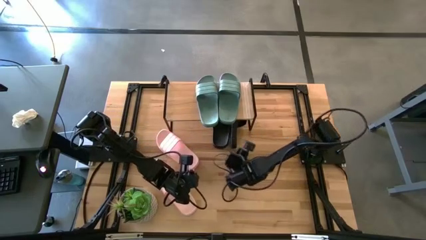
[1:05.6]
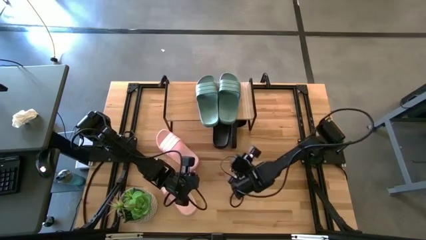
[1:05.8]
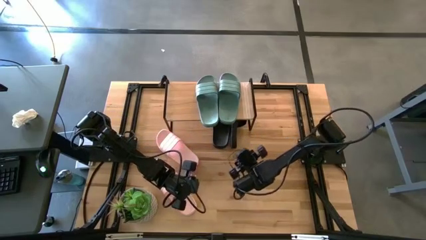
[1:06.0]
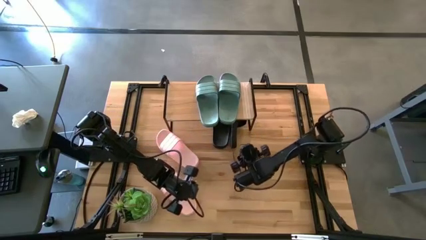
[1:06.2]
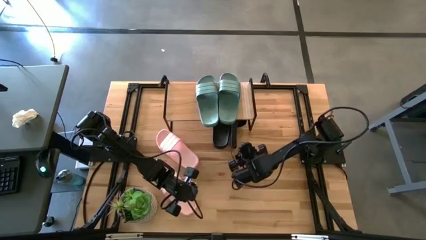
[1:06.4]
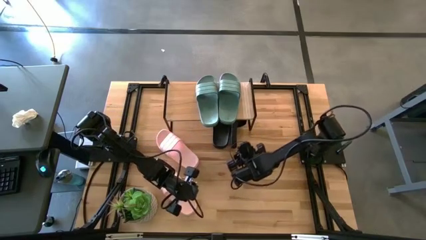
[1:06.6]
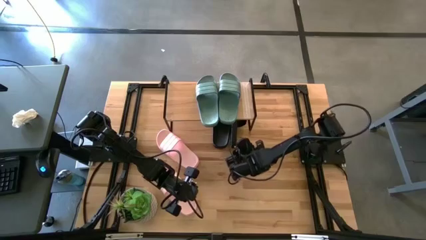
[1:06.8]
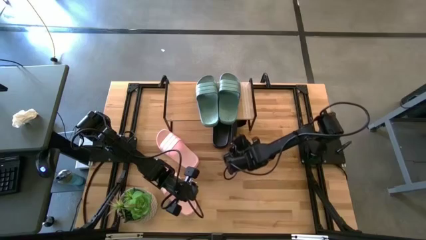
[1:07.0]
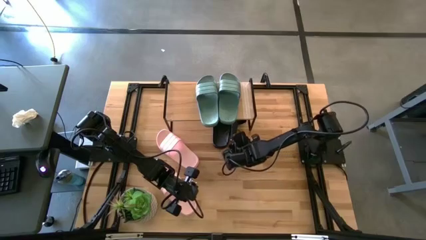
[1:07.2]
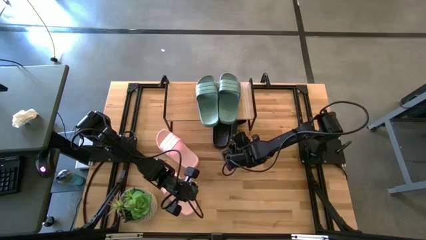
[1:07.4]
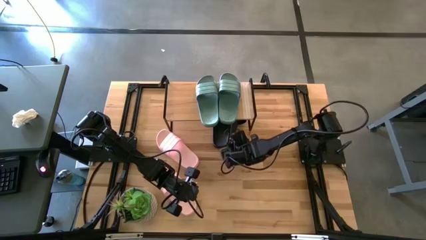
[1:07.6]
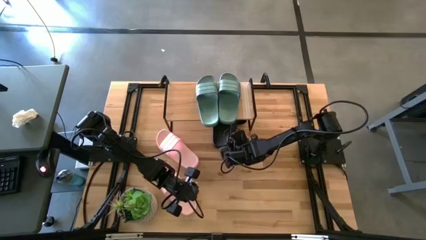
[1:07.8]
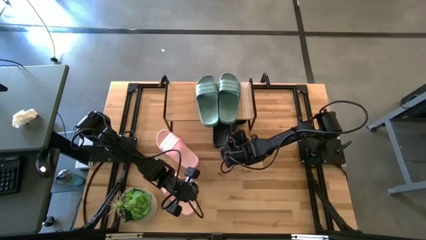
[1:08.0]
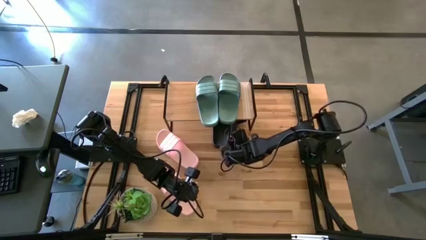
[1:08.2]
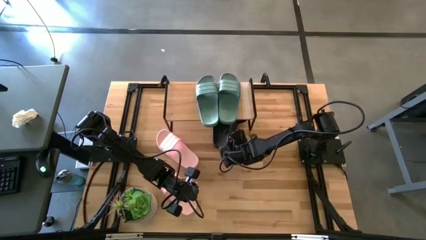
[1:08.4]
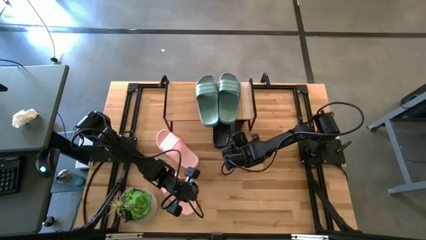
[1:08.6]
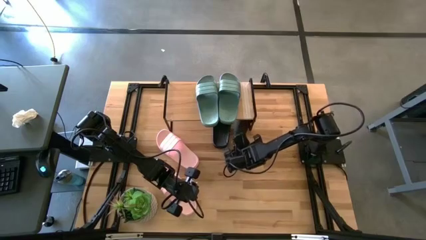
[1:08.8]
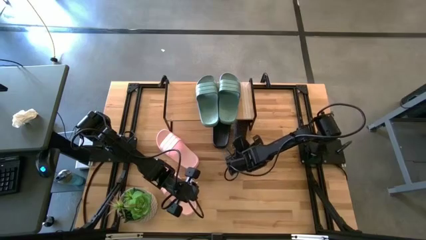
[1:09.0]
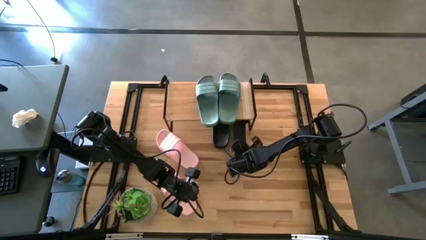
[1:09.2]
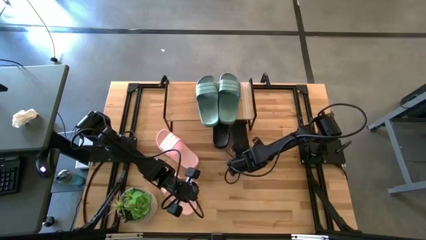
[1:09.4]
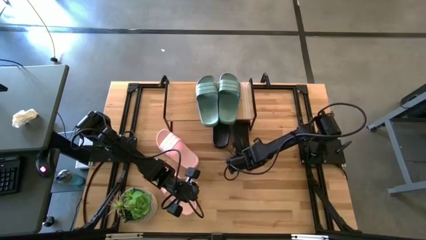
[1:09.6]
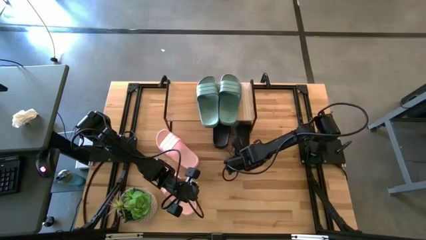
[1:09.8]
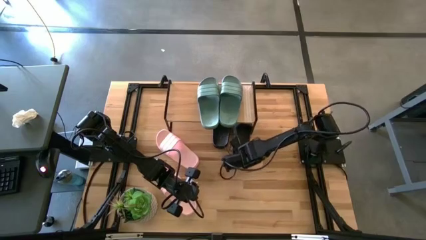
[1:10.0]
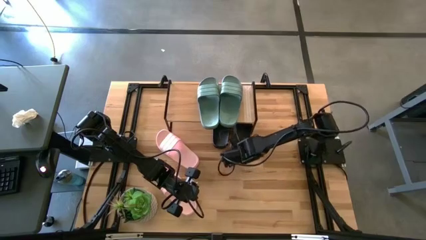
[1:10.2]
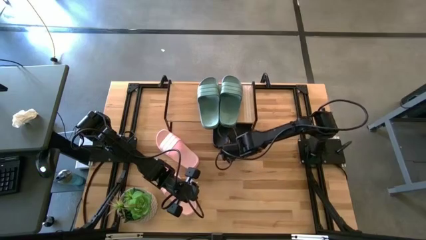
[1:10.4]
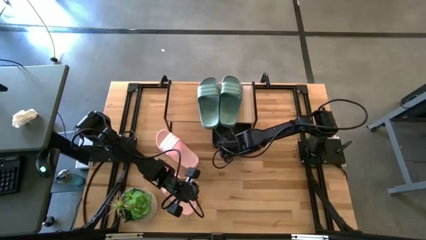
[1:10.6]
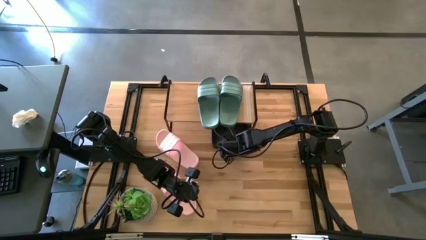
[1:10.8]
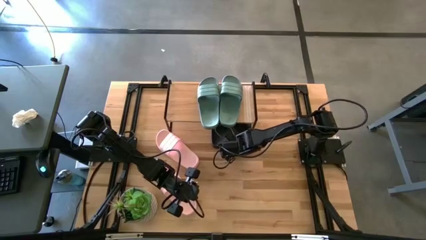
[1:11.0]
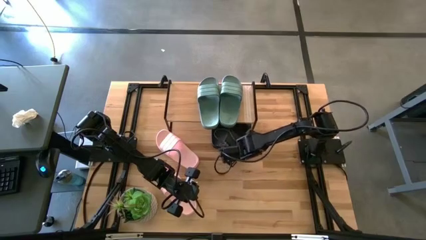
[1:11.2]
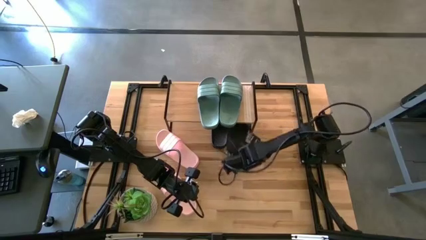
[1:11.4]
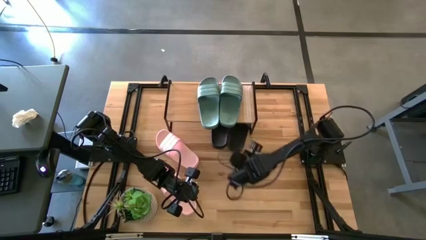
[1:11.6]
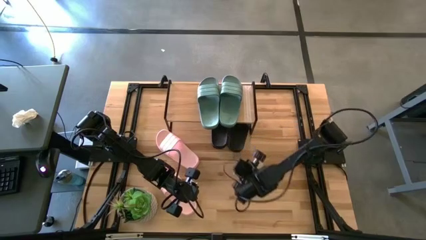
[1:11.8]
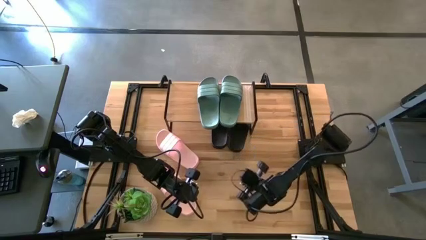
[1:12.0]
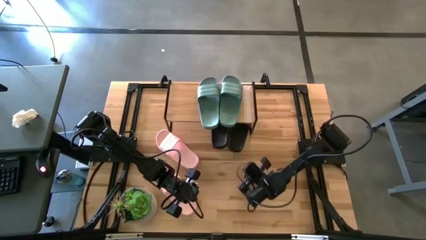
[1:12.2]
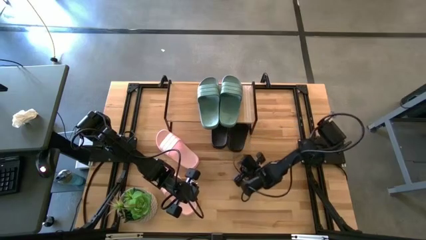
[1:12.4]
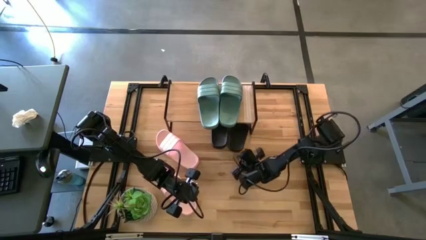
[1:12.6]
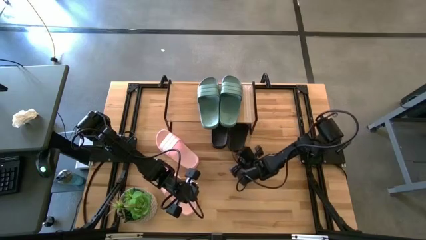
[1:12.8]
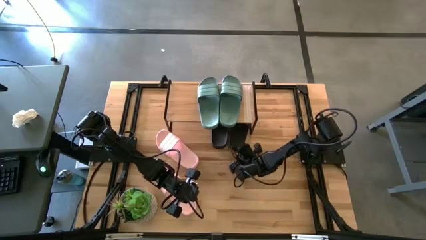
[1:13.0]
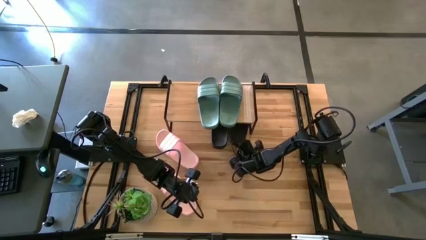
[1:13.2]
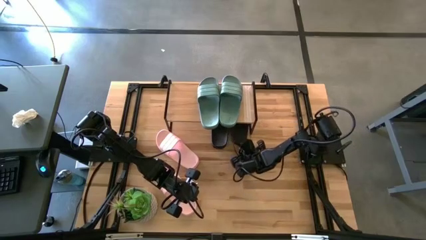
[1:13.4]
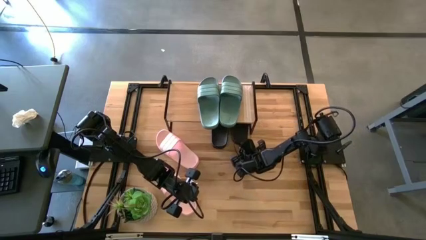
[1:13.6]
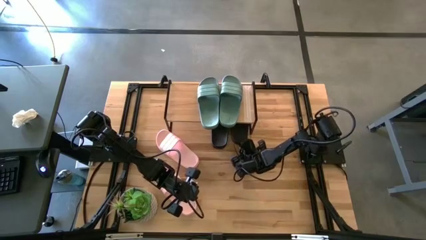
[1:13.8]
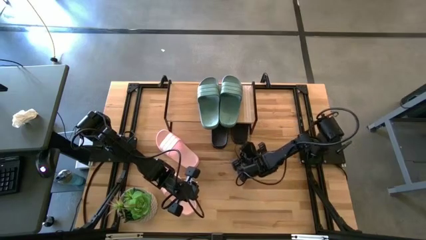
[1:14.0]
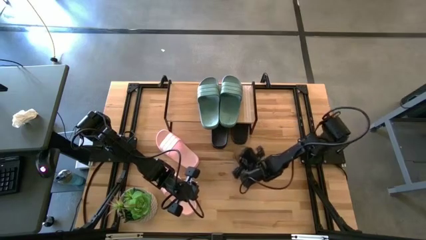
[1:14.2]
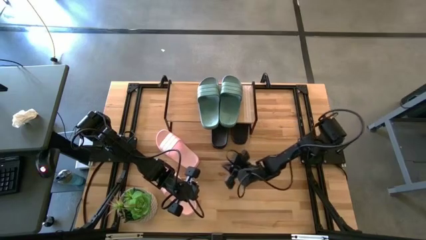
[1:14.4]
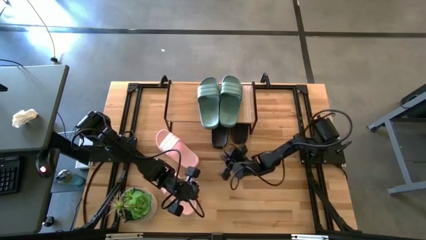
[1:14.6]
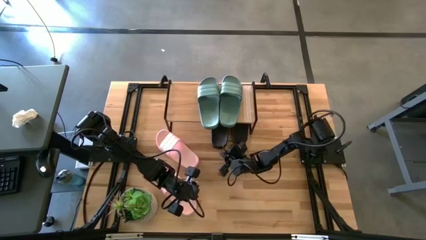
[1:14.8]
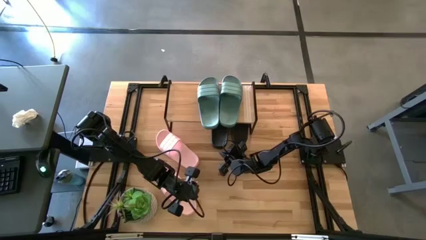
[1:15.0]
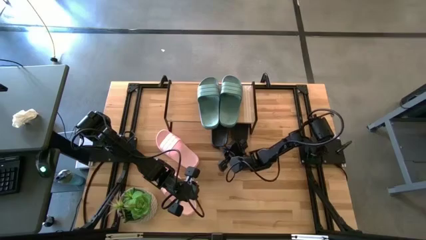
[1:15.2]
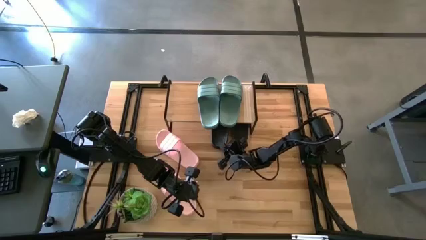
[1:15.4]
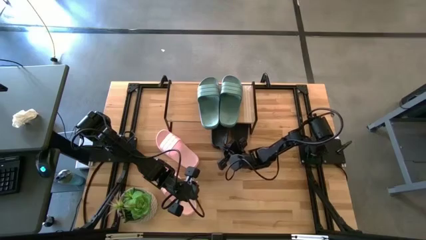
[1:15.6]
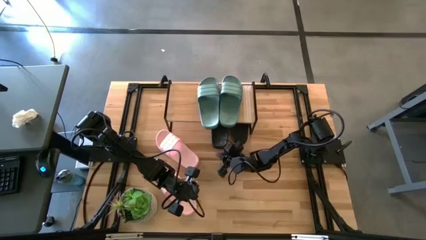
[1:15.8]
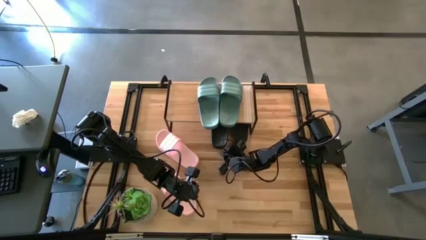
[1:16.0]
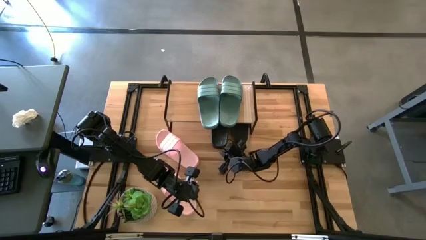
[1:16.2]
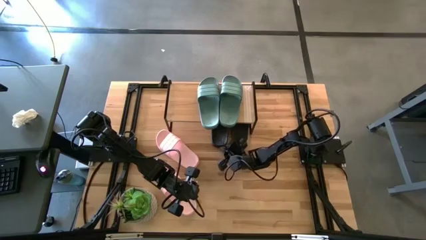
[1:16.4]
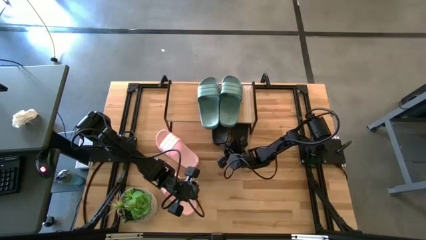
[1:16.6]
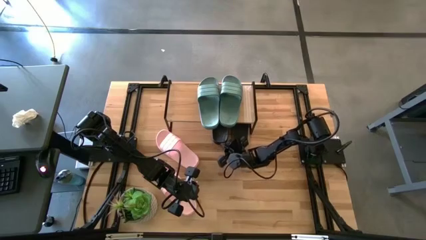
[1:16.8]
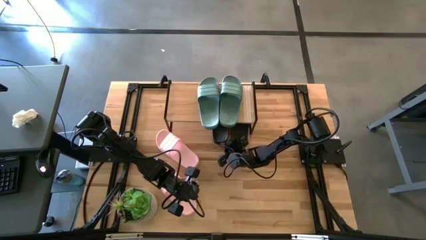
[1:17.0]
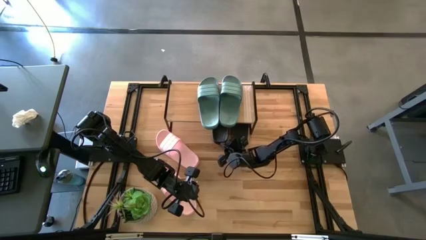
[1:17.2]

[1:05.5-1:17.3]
Task: Pick and place slides into the shelf
Adjust the black slippers under the shelf
